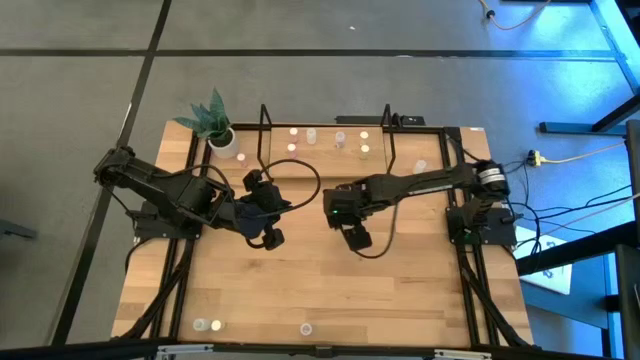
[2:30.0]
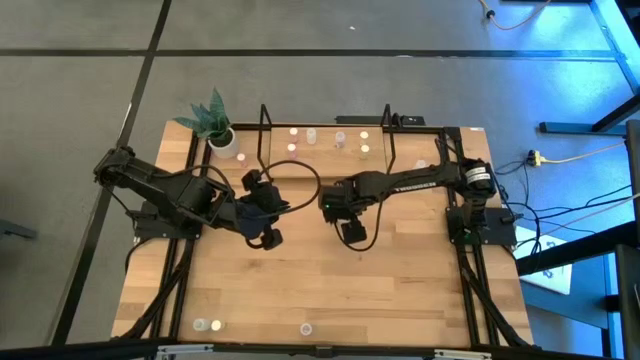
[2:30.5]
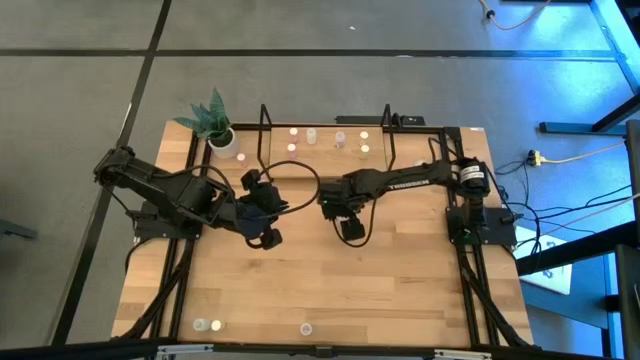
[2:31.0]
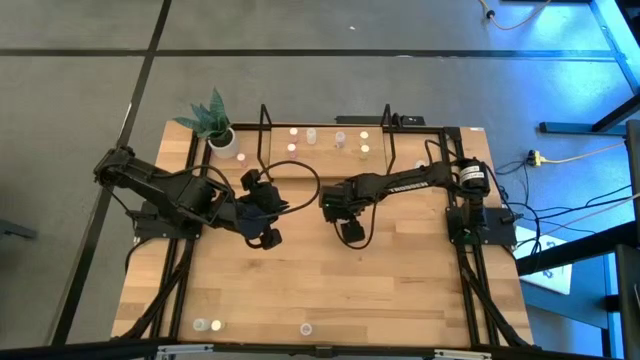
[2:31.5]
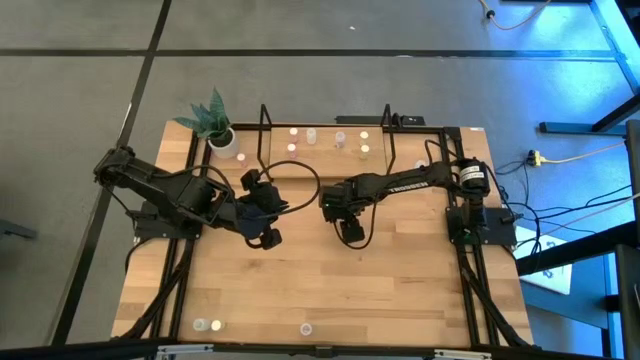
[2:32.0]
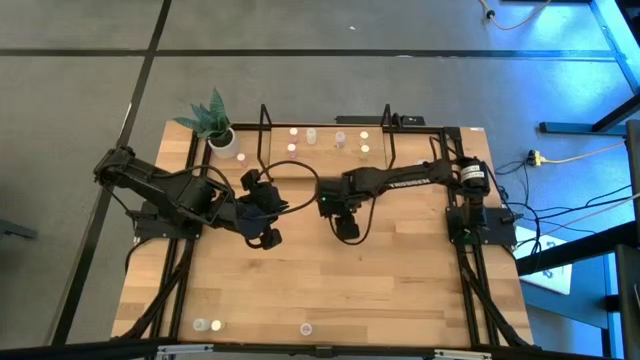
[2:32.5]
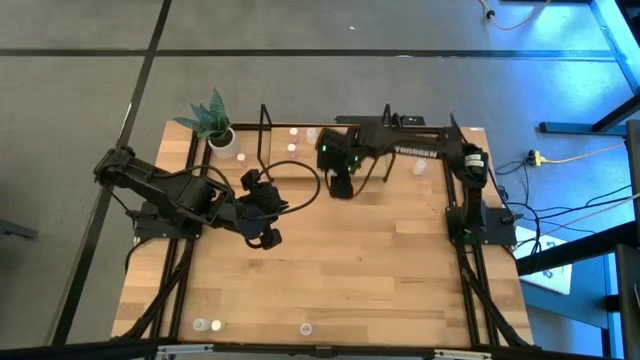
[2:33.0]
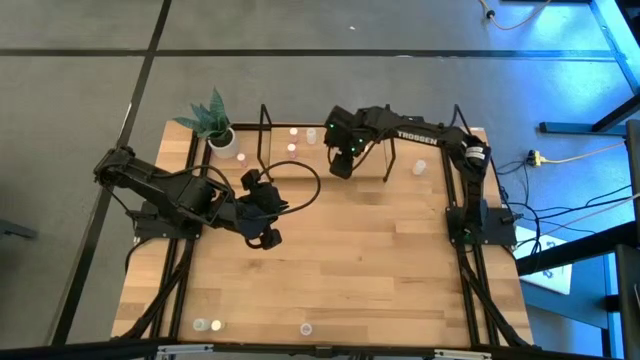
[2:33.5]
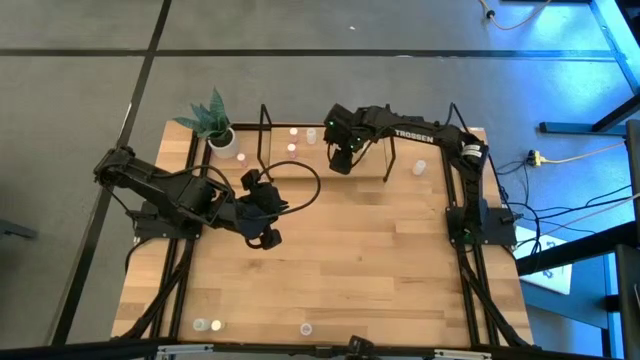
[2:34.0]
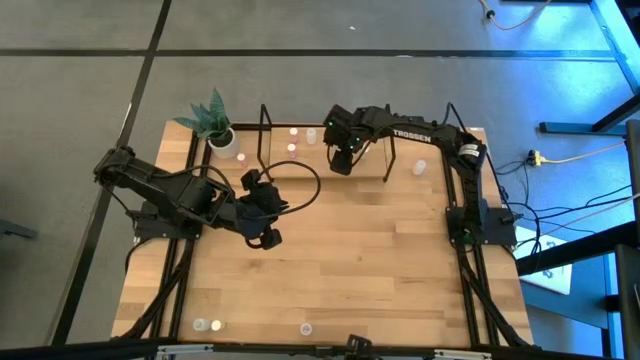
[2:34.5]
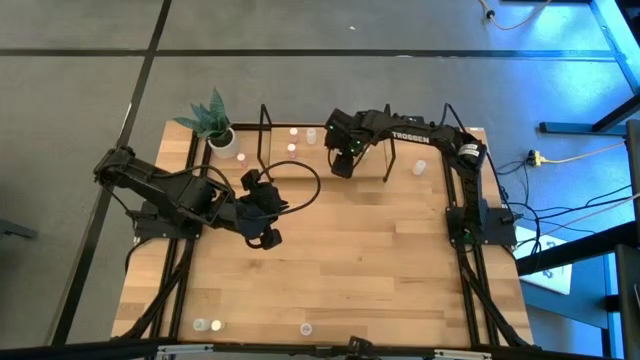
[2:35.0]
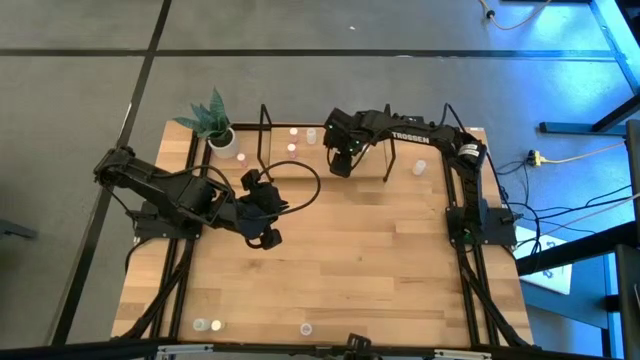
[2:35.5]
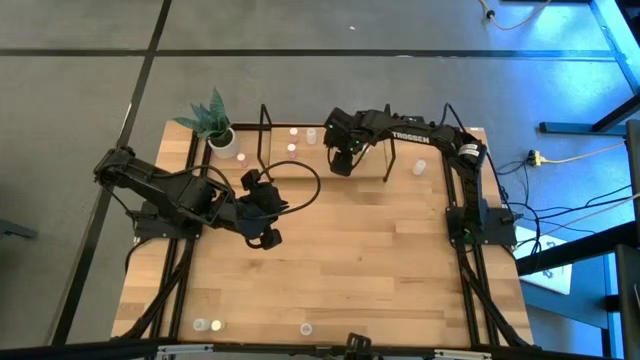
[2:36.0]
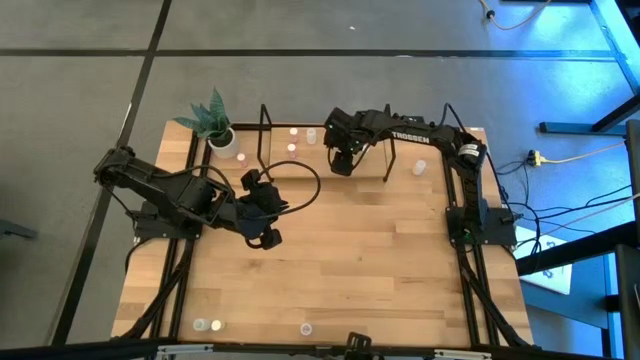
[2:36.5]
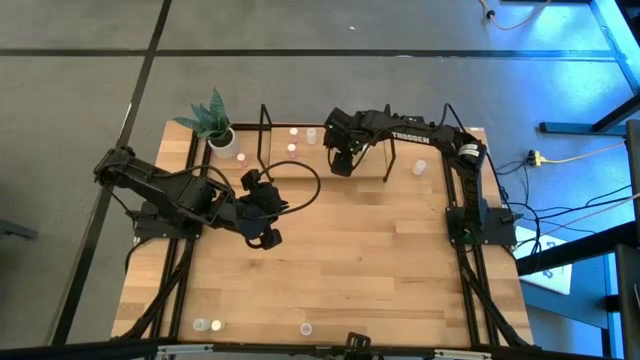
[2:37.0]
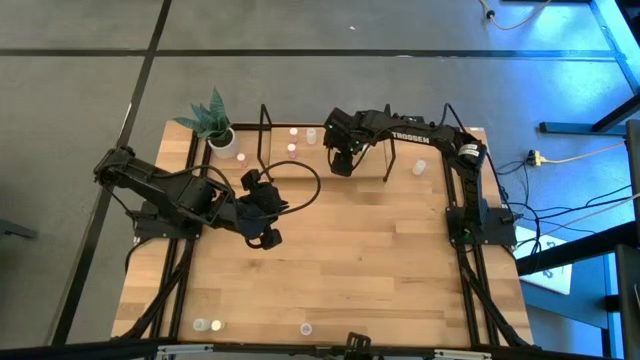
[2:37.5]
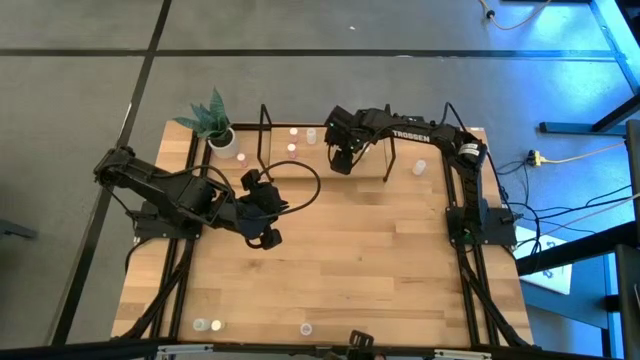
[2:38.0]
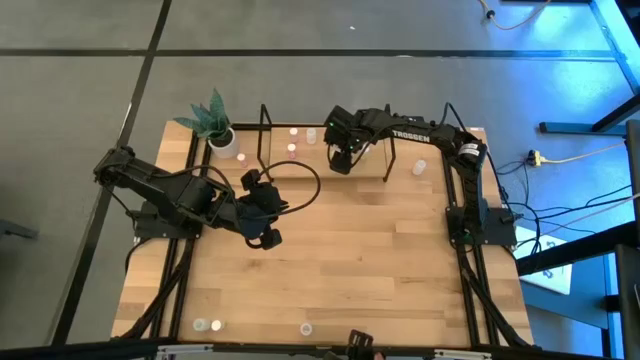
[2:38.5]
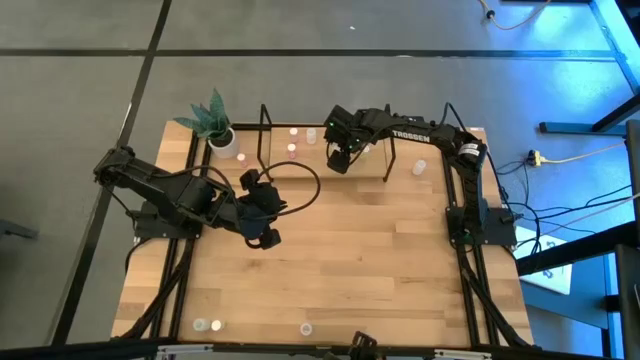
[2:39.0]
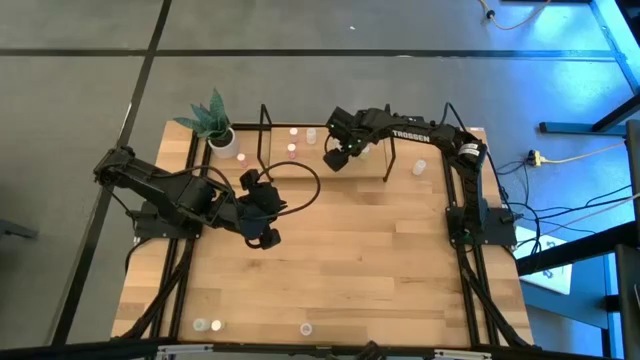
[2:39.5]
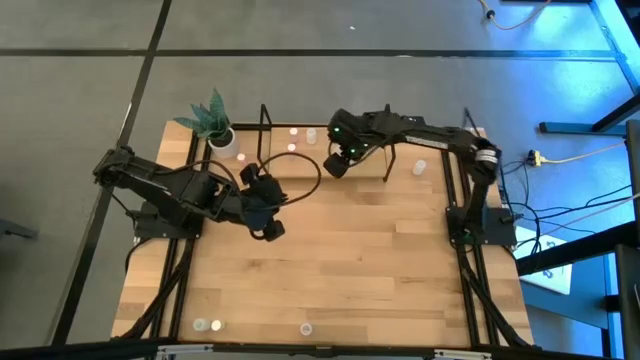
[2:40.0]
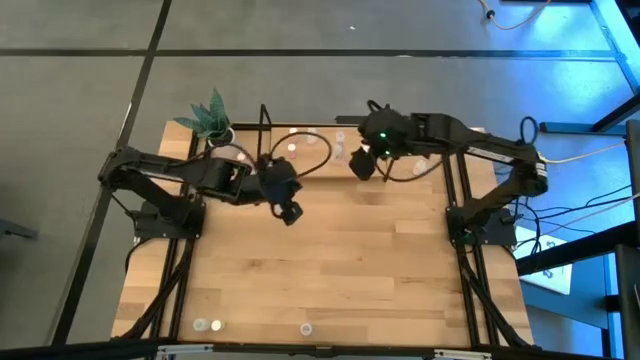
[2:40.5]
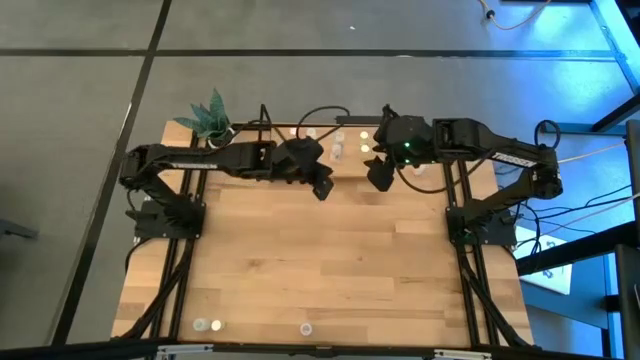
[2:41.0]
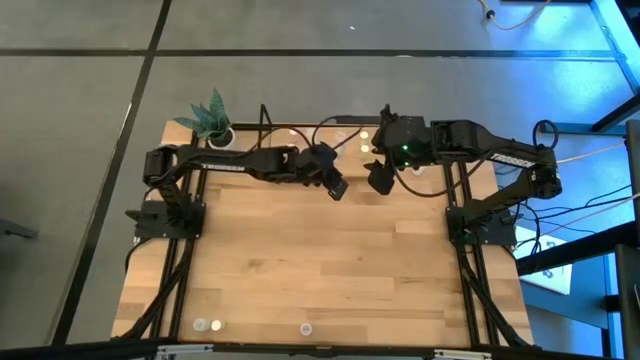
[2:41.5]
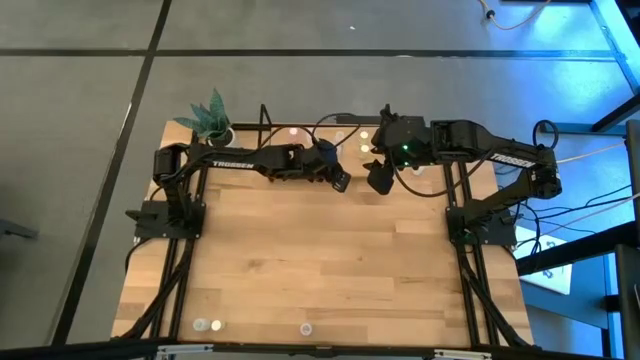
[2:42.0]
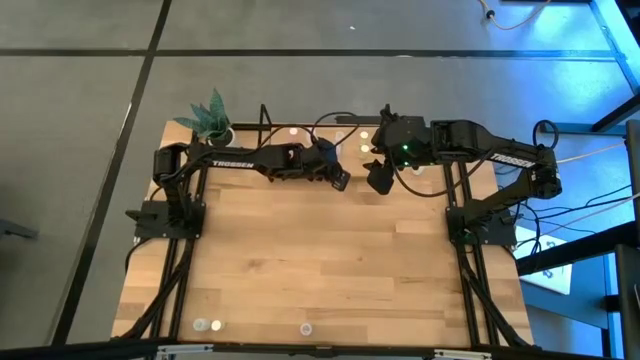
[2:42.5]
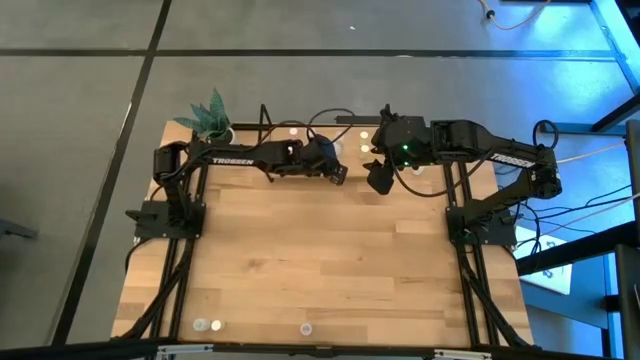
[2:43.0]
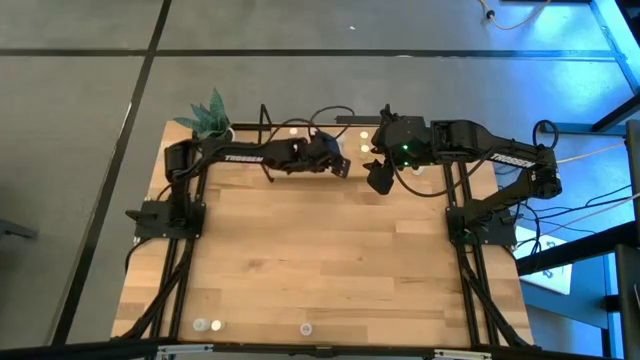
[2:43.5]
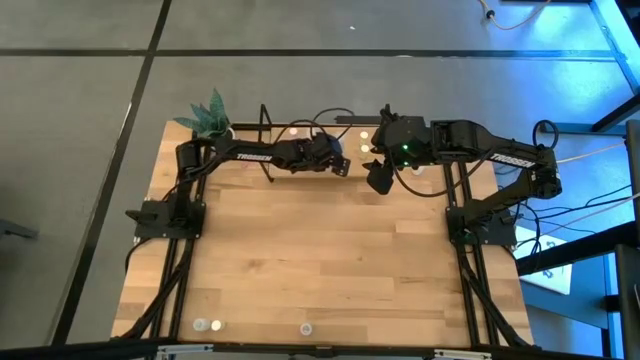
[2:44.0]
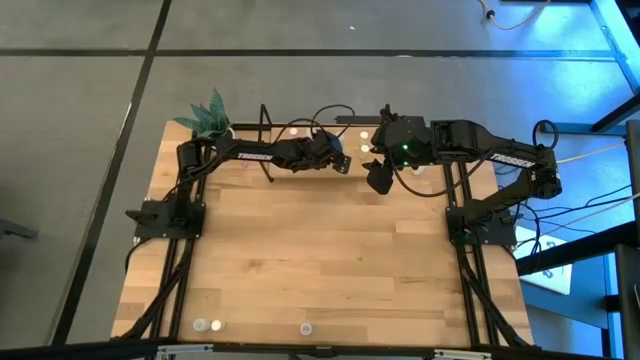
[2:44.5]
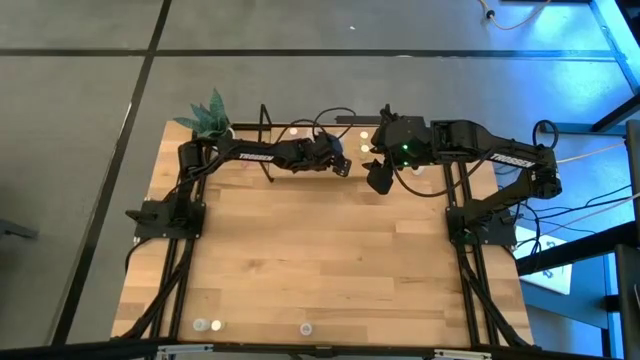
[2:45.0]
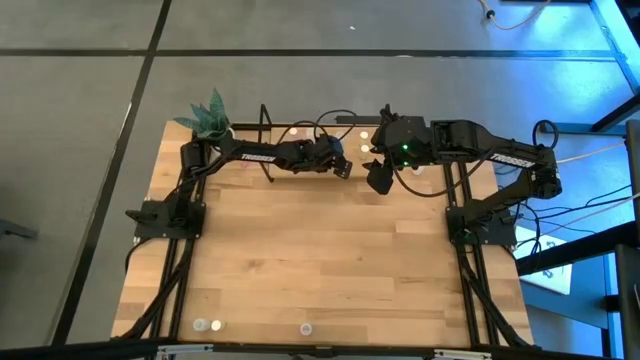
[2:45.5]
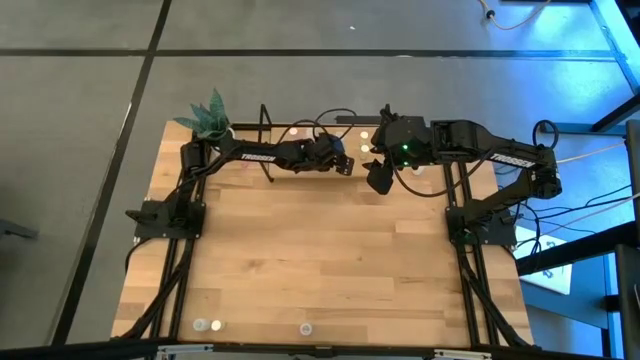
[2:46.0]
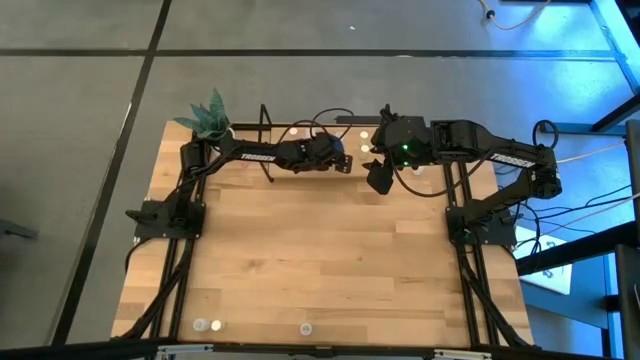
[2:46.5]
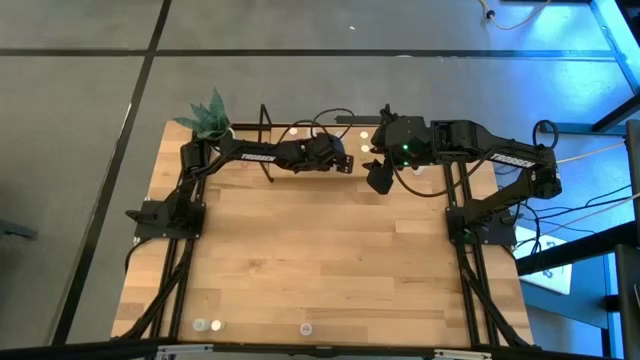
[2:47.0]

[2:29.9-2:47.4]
Task: Pick and place medicine bottles onto shelf by color
Put the top transparent pill bottle on the shelf aligned with the other transparent pill bottle

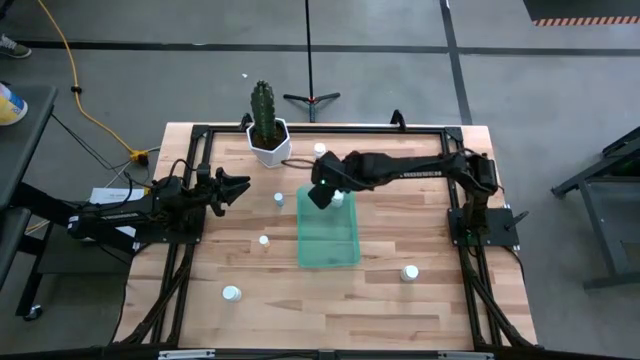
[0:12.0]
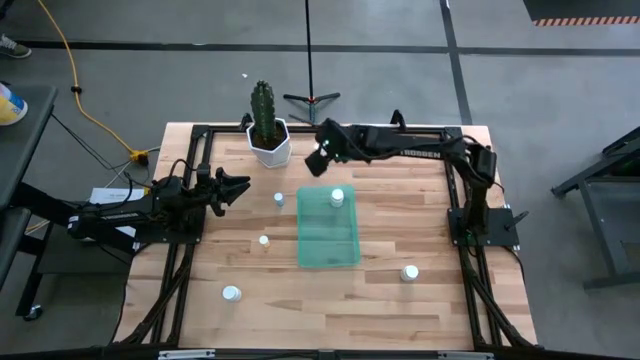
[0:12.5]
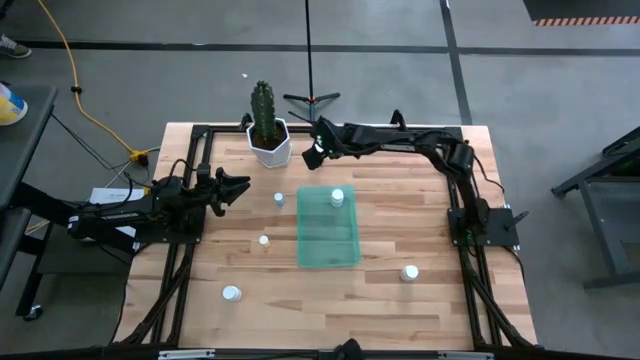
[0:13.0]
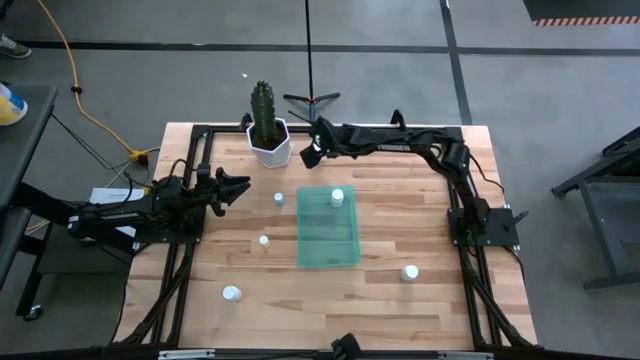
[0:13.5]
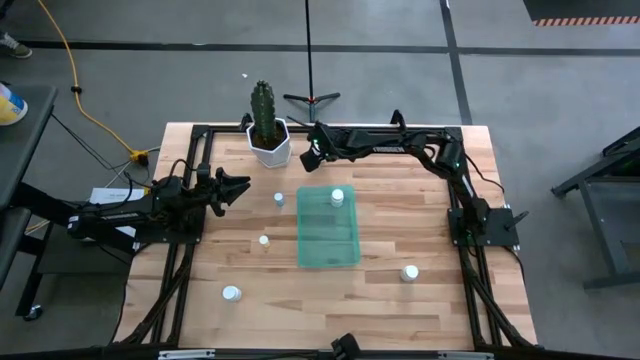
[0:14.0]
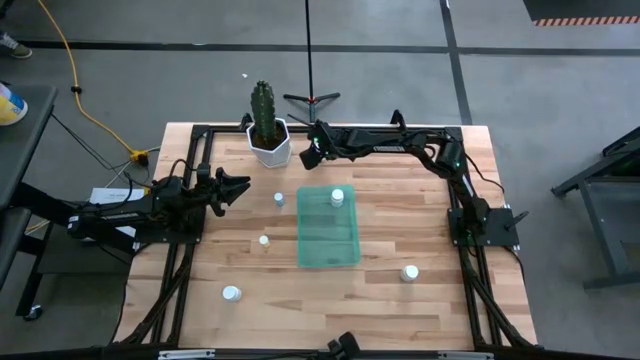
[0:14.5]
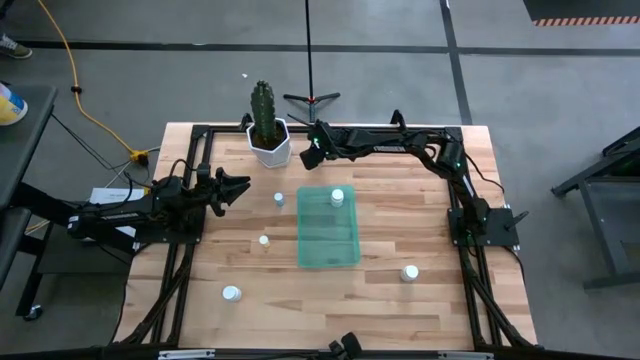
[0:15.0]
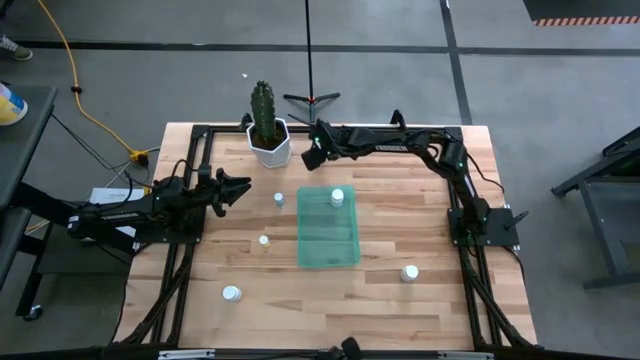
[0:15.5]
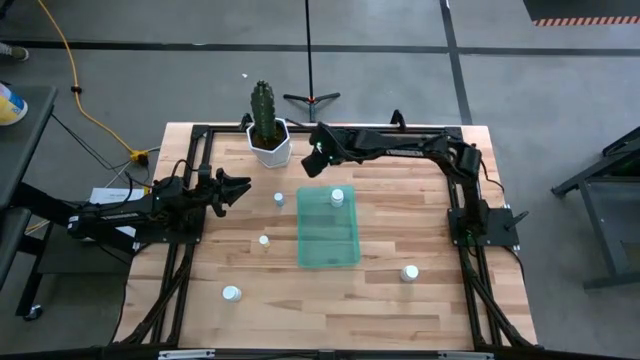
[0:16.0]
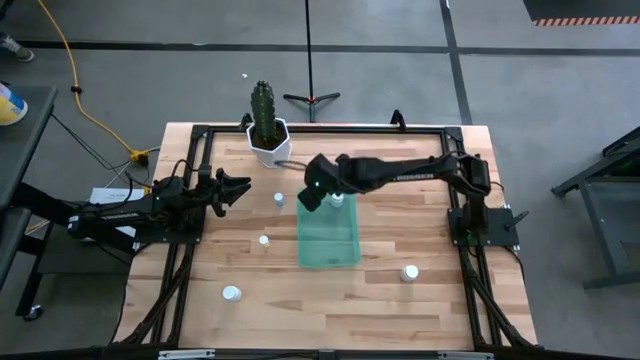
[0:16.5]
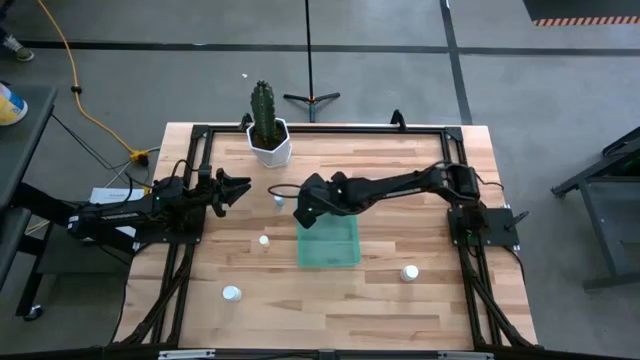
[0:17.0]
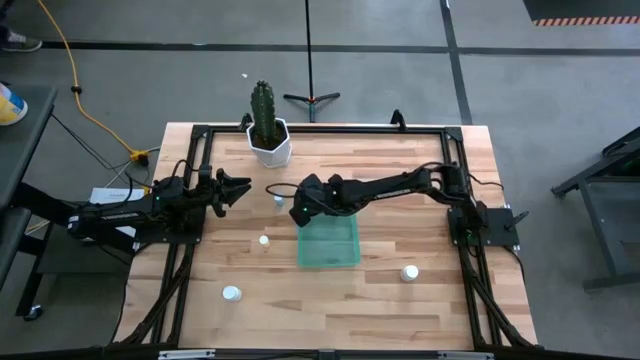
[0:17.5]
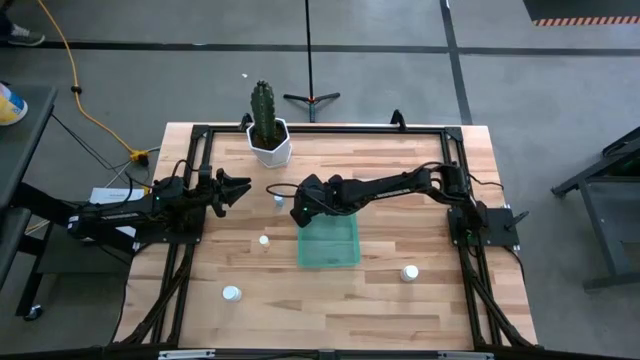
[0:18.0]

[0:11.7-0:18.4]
Task: Pick and place pill bottles into a basket
Put the white pill bottle into the green bin
